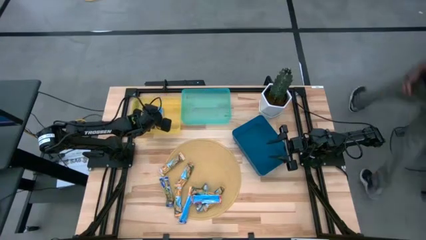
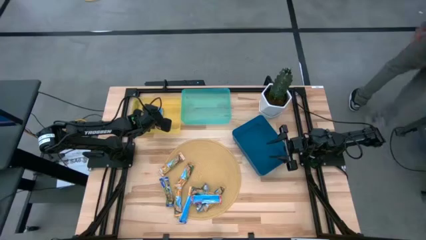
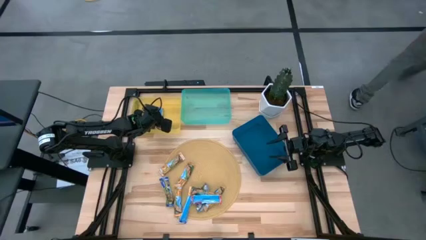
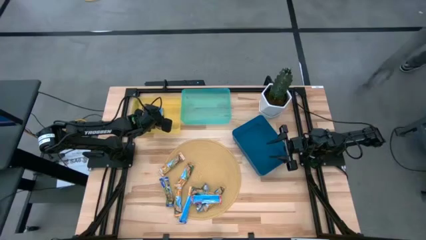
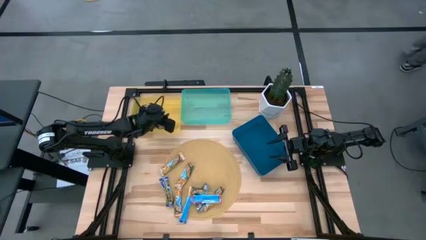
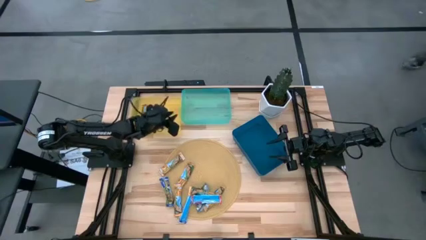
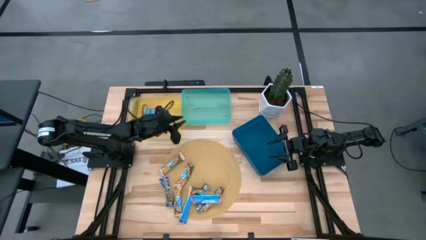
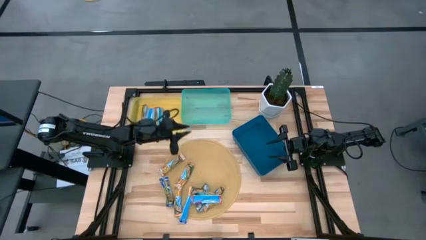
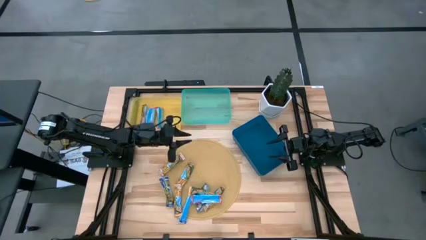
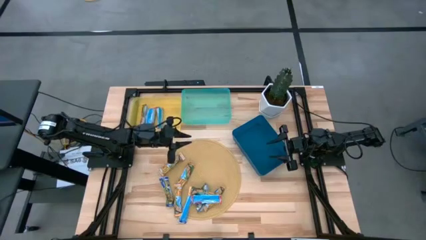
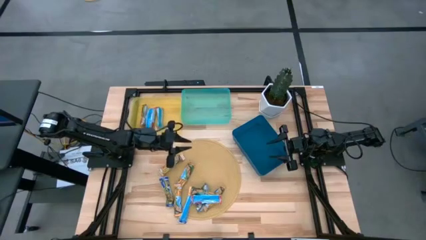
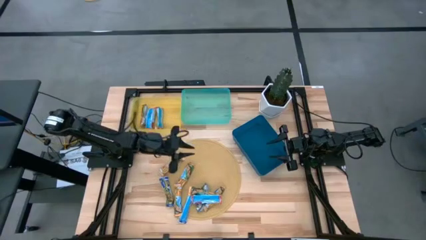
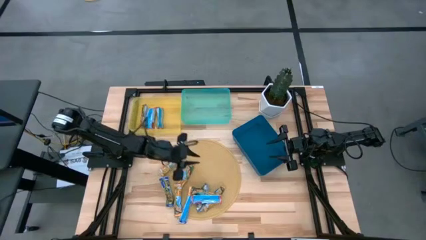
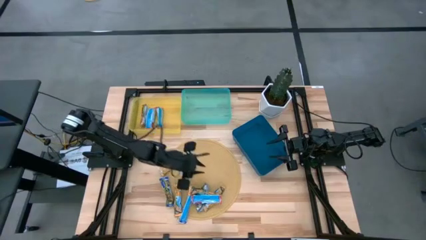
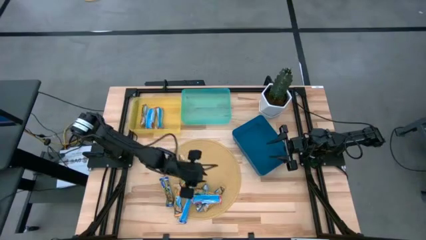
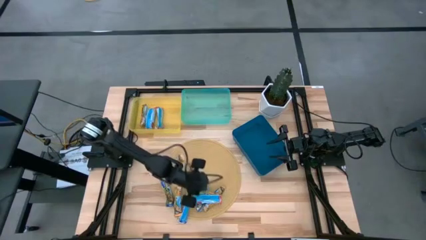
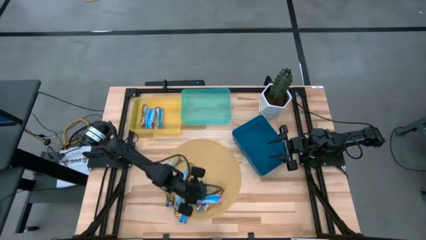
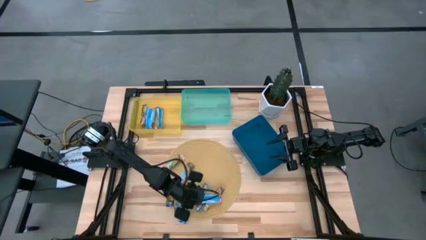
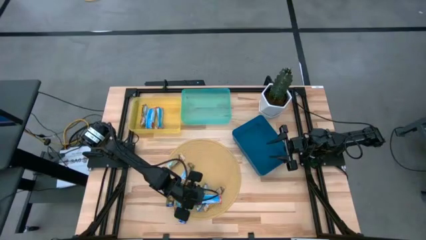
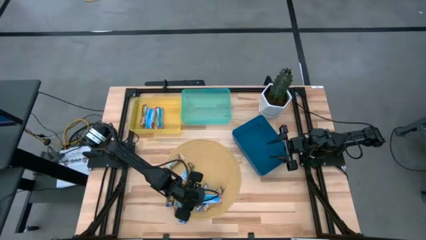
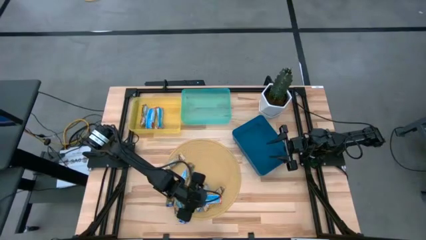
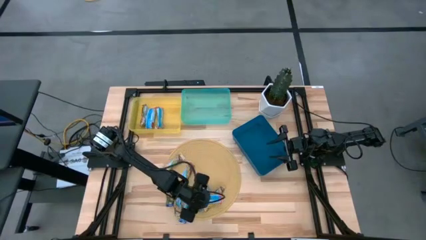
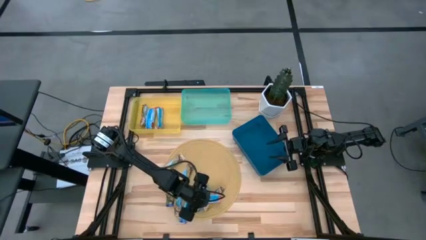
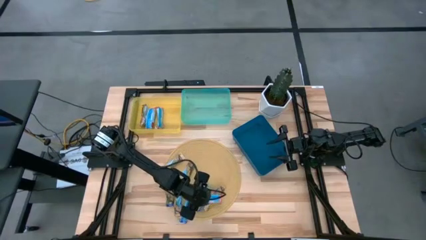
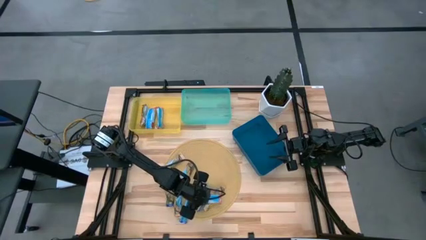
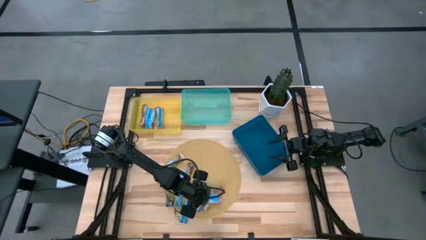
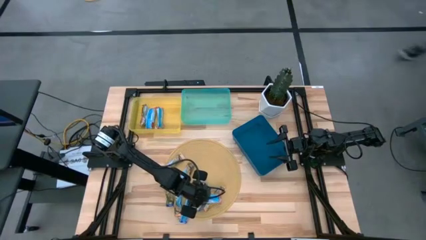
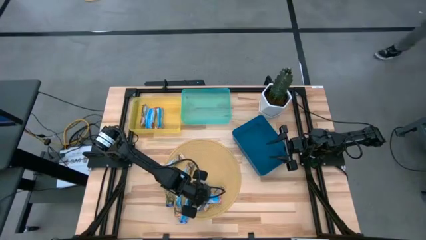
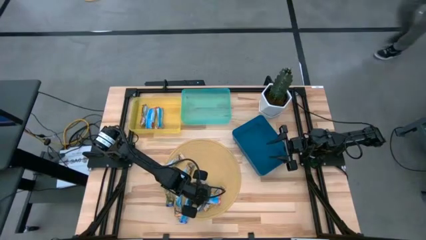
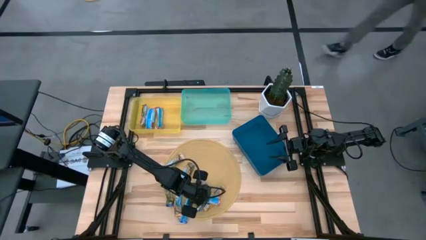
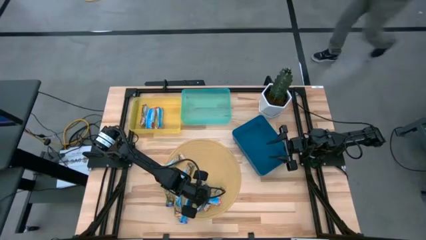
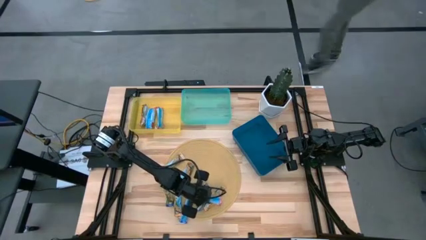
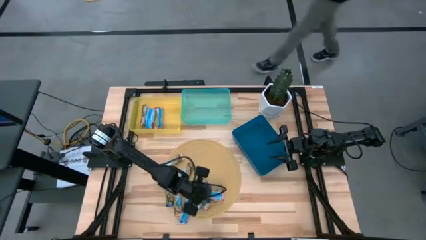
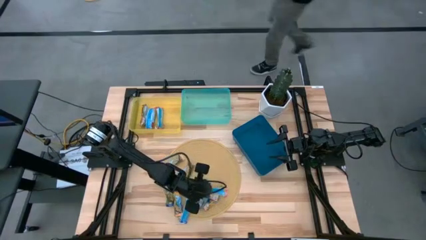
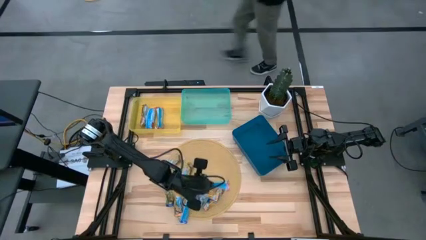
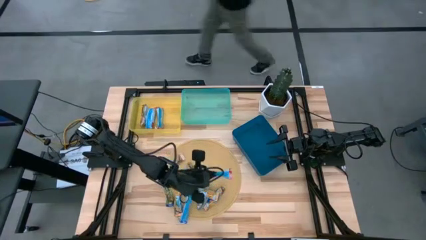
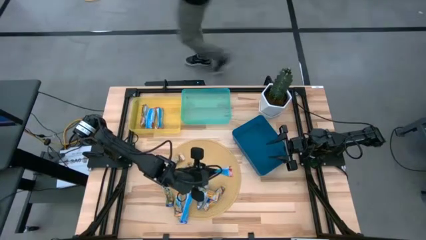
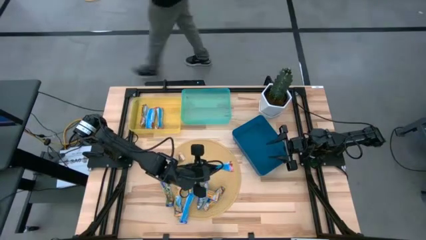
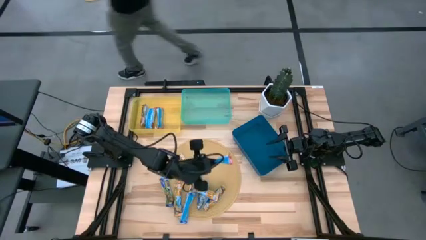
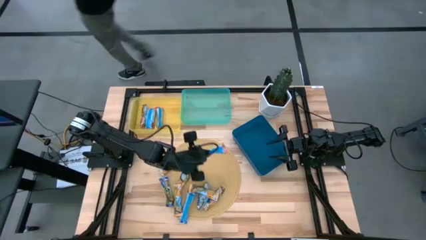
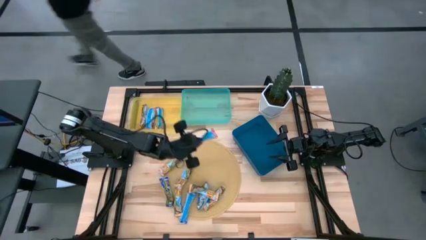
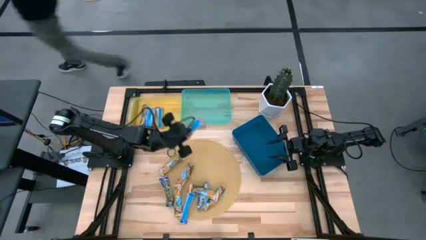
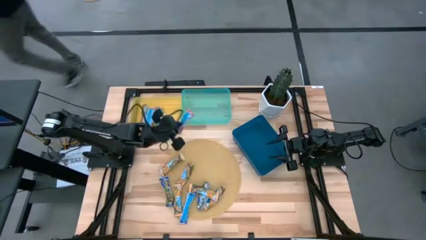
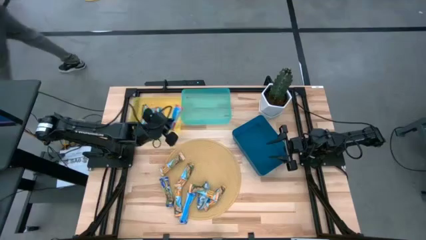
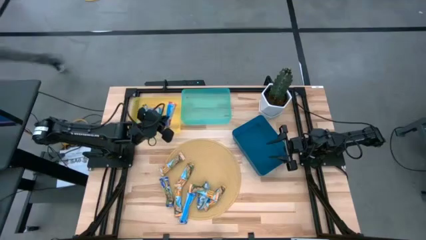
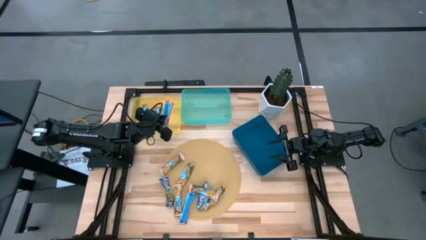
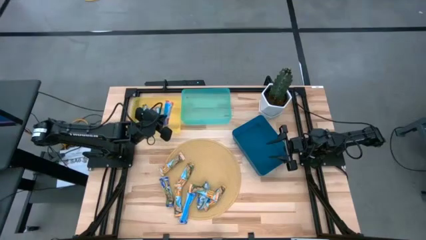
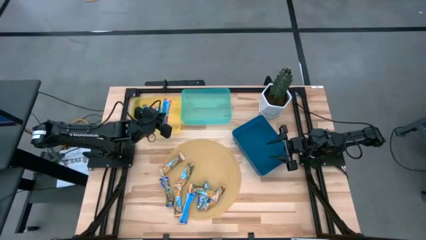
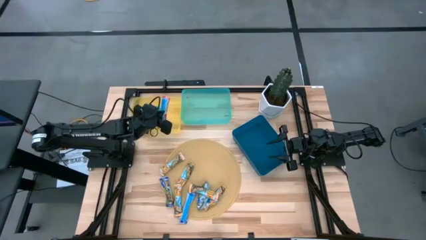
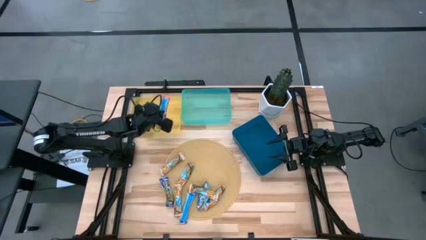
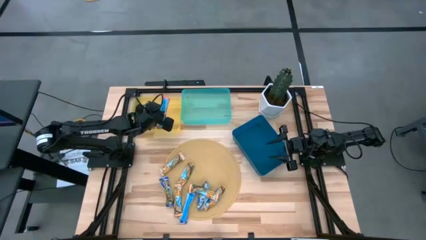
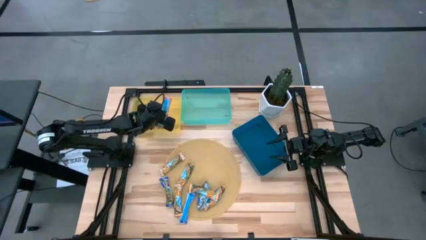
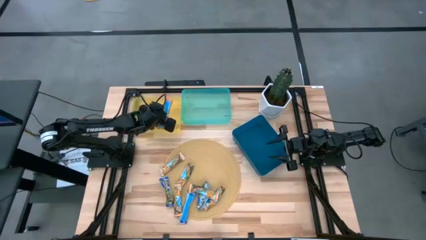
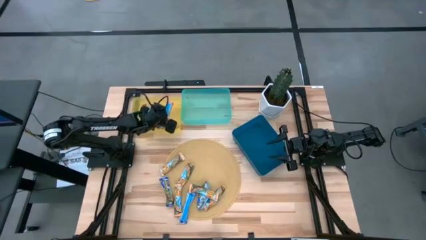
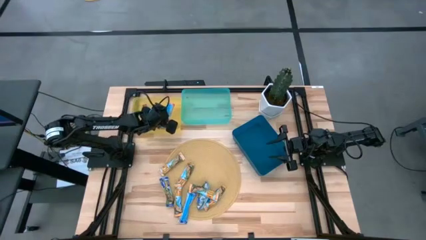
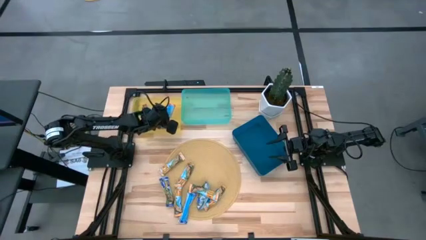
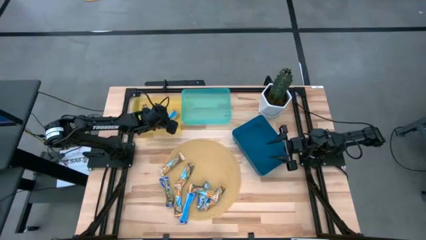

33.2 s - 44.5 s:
Task: Pick and place Granola Bars by type
Put the red granola bar into the yellow bin

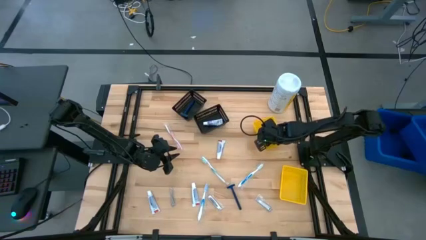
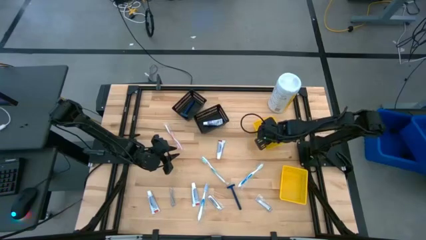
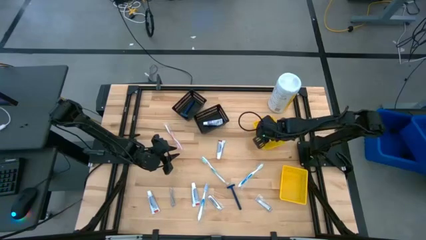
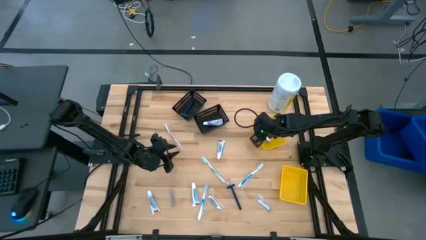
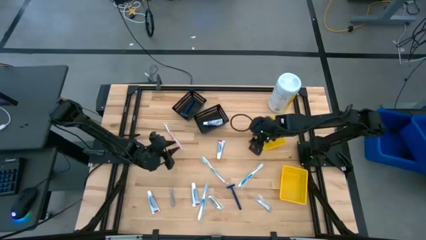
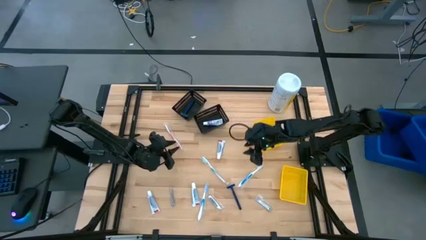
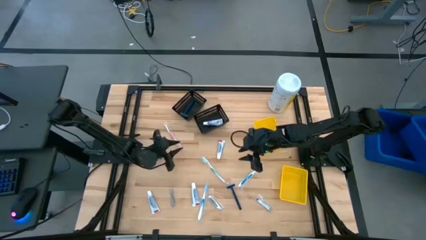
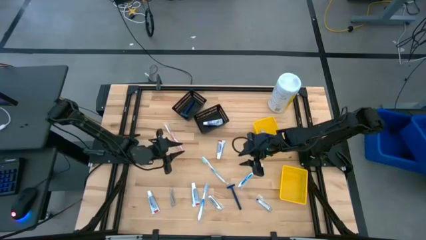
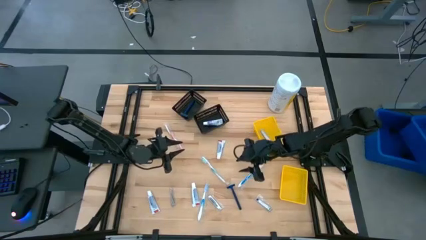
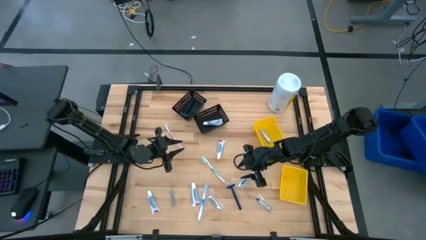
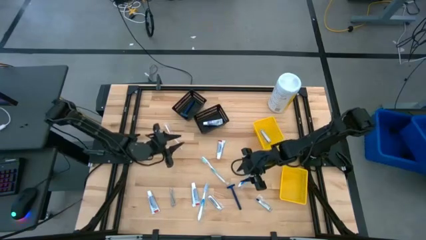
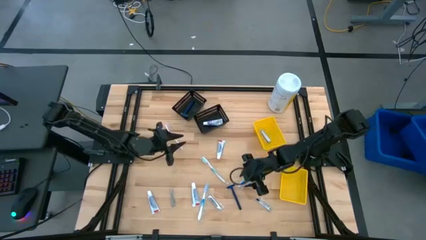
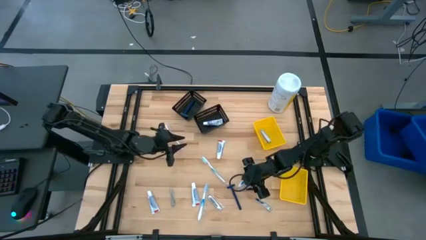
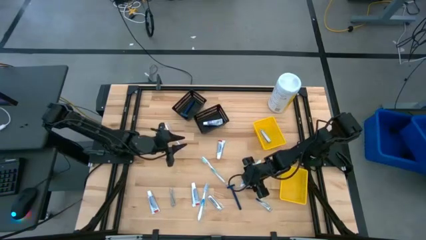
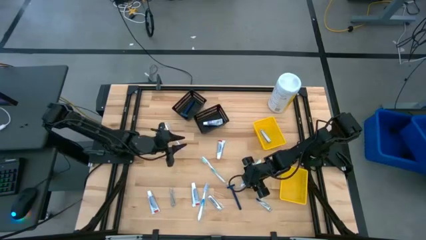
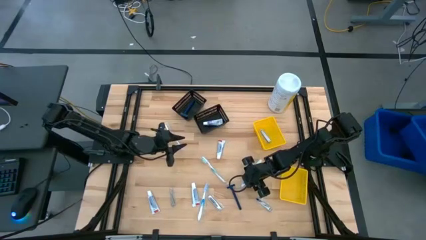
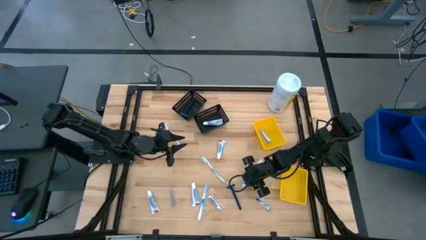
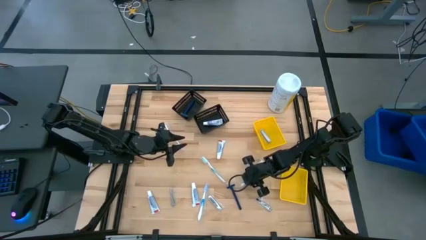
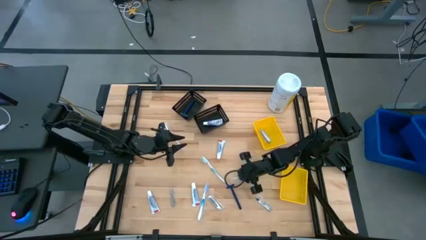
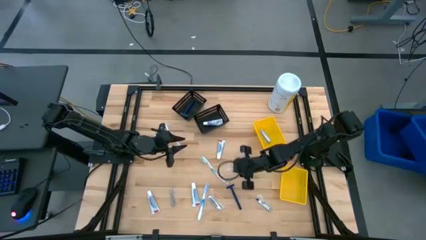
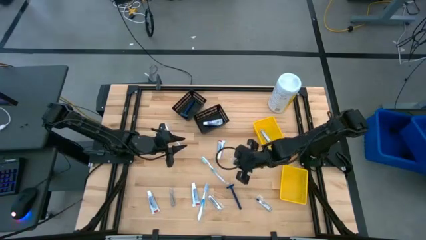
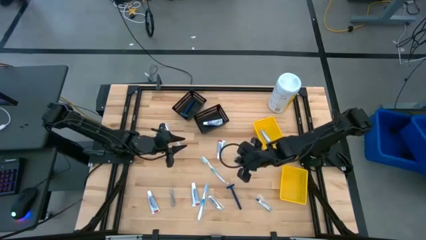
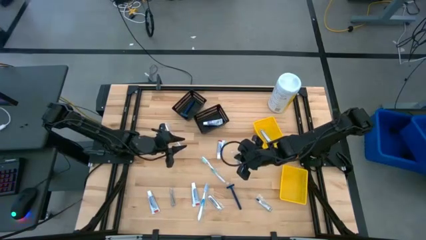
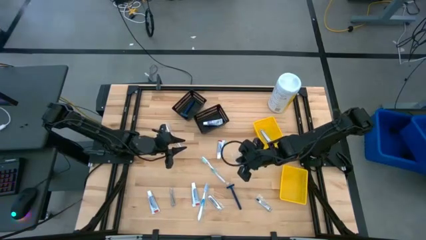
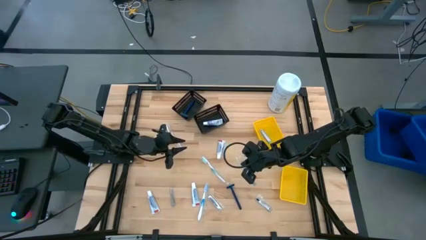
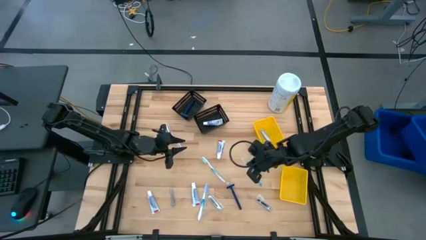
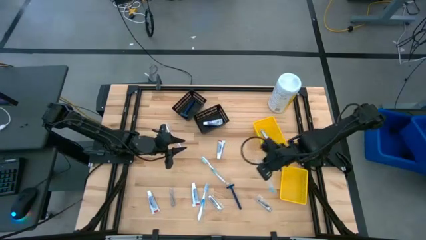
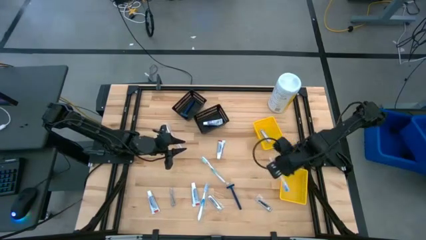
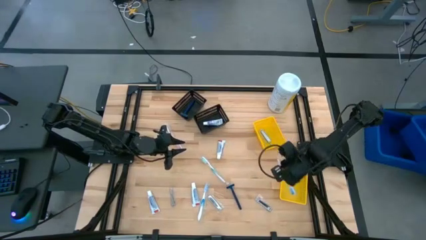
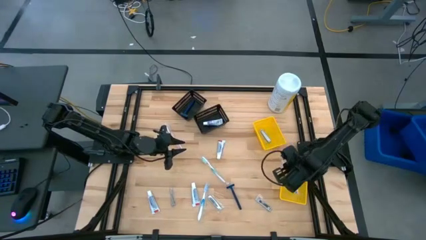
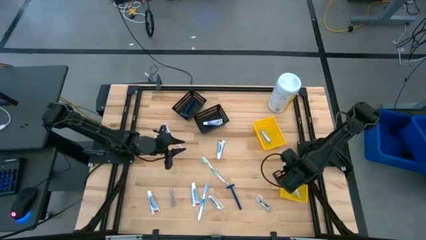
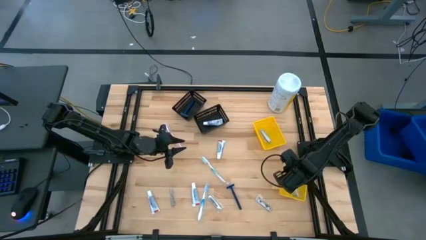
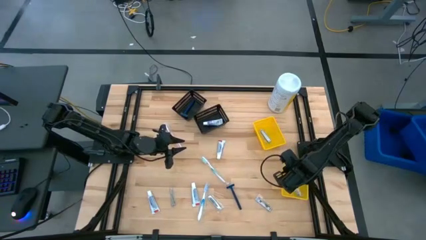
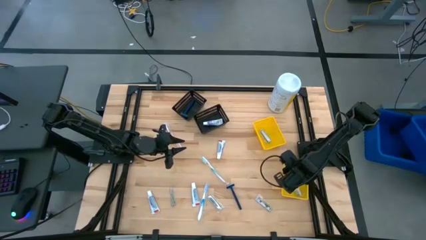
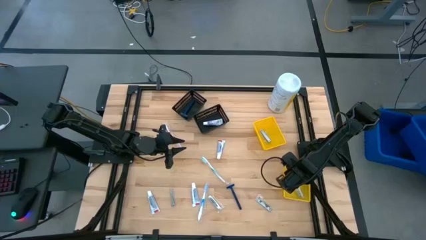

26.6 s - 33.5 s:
Task: Pick & Place Travel size toiletries
Put the blue toothbrush into the bottom yellow bin
